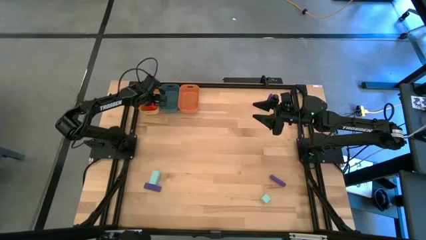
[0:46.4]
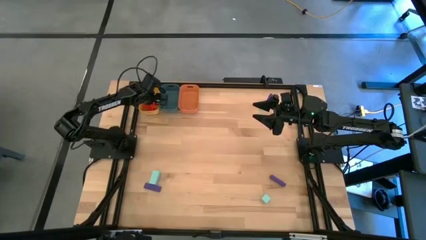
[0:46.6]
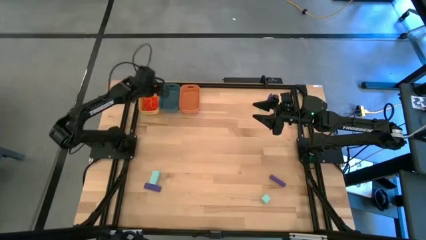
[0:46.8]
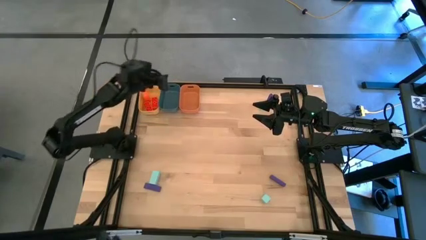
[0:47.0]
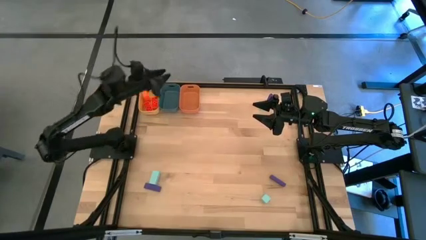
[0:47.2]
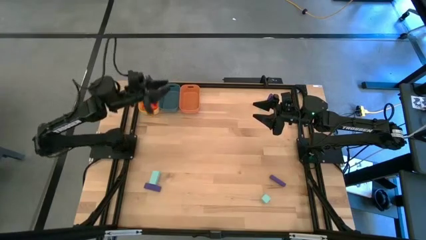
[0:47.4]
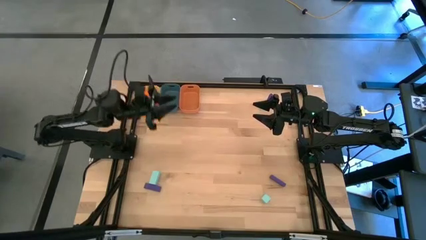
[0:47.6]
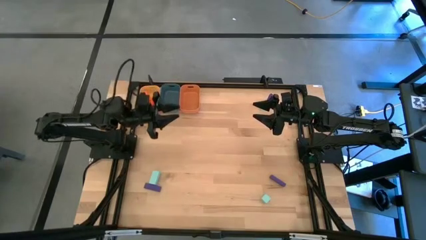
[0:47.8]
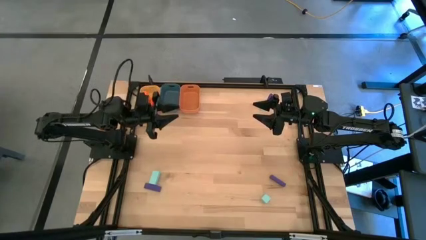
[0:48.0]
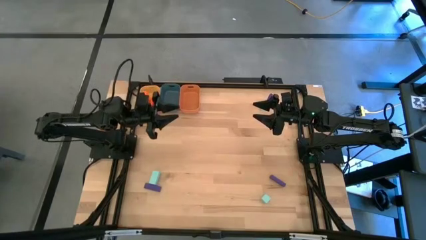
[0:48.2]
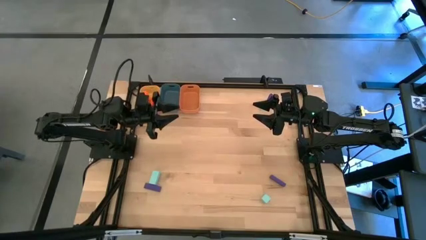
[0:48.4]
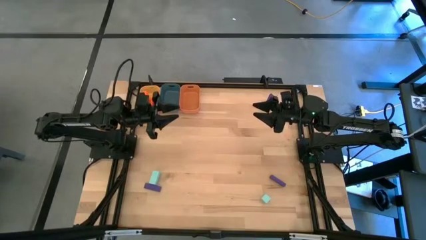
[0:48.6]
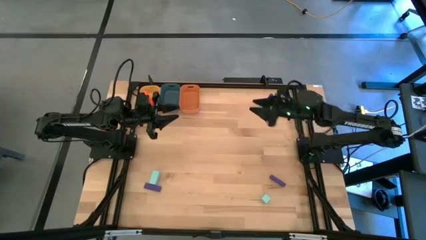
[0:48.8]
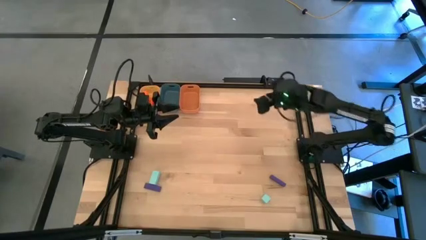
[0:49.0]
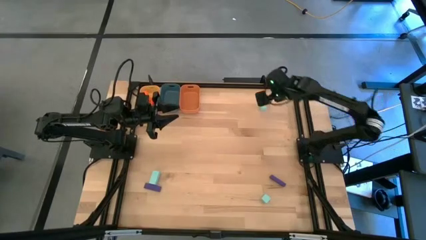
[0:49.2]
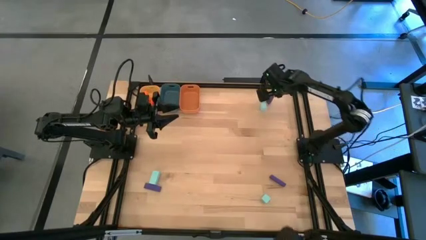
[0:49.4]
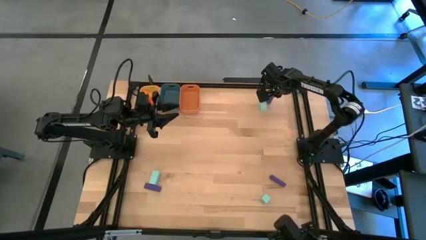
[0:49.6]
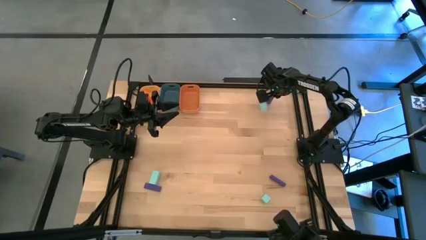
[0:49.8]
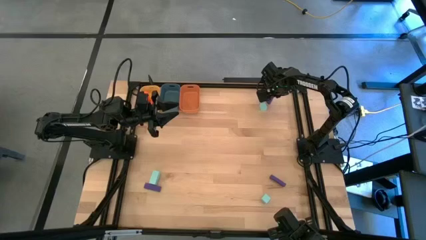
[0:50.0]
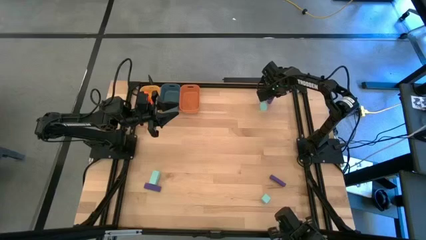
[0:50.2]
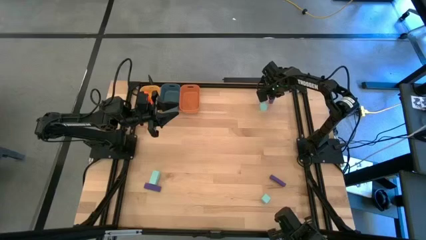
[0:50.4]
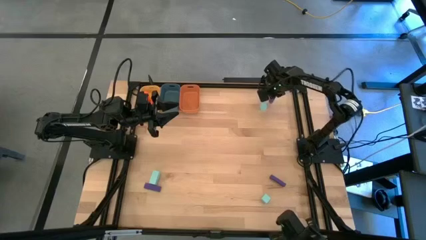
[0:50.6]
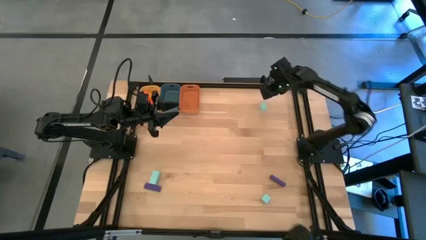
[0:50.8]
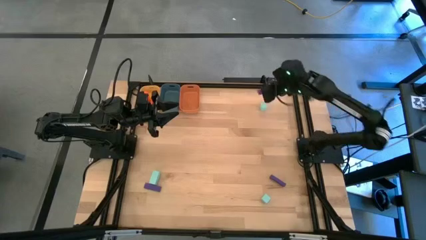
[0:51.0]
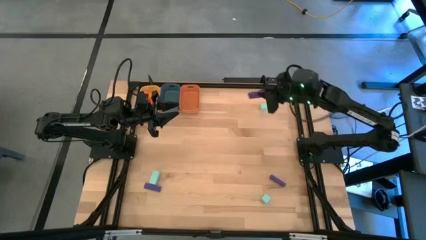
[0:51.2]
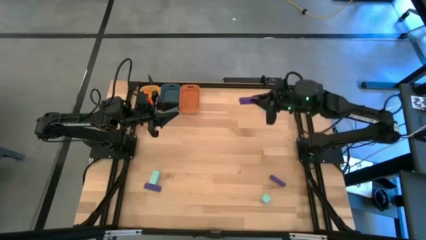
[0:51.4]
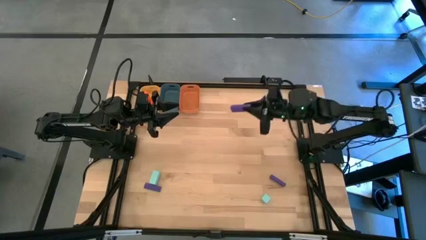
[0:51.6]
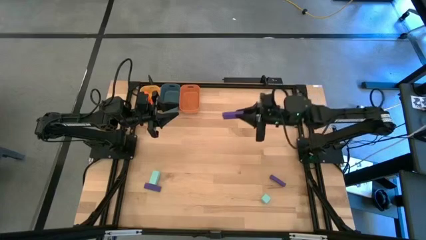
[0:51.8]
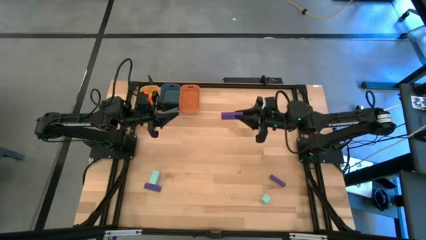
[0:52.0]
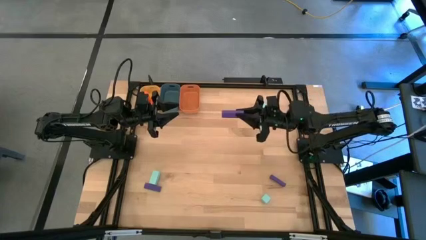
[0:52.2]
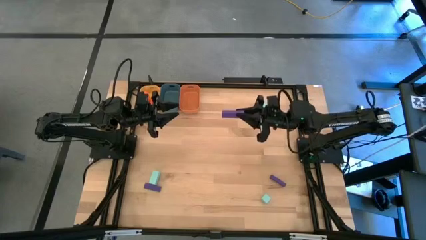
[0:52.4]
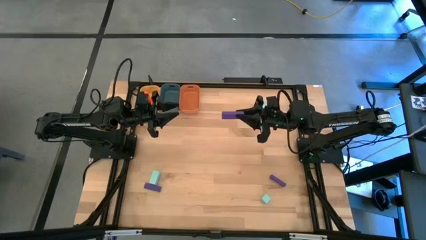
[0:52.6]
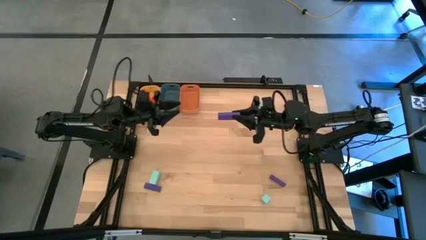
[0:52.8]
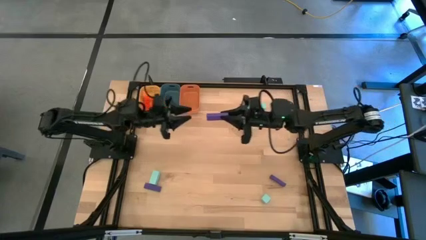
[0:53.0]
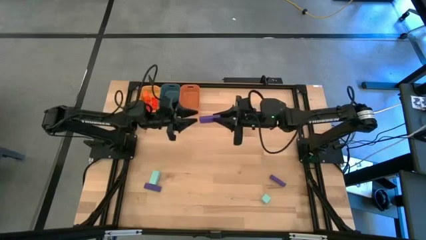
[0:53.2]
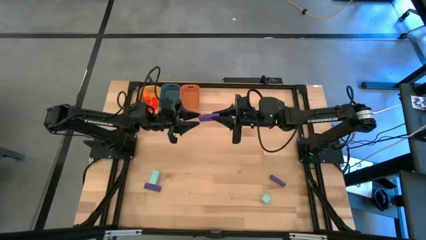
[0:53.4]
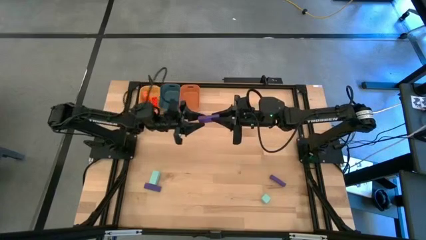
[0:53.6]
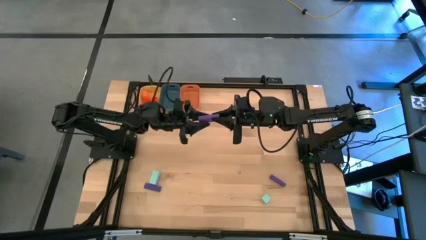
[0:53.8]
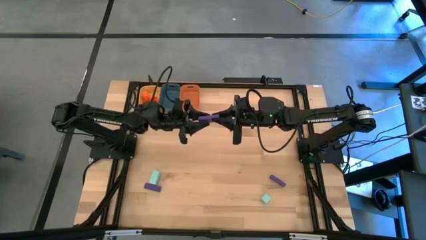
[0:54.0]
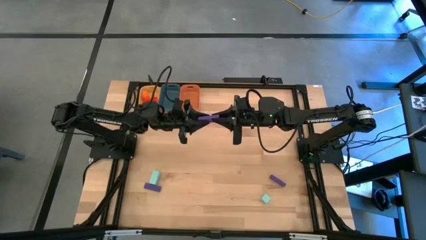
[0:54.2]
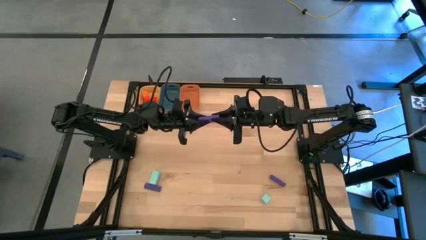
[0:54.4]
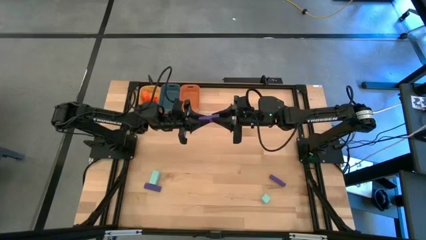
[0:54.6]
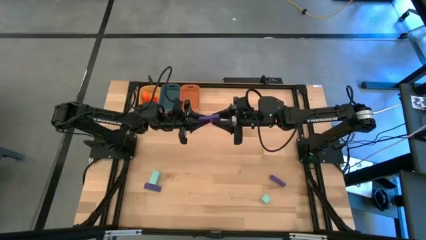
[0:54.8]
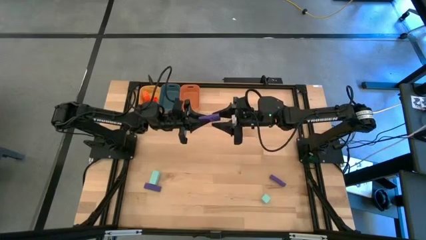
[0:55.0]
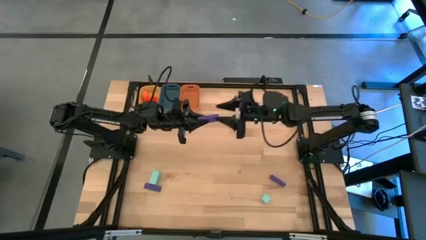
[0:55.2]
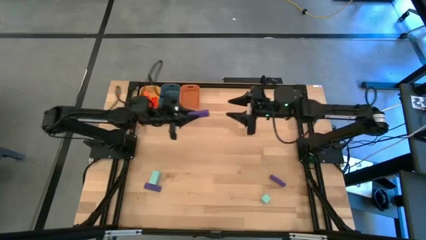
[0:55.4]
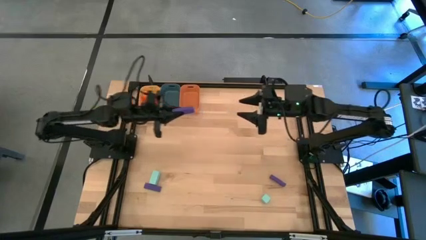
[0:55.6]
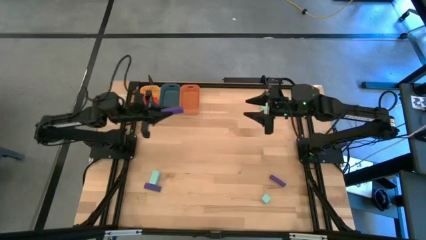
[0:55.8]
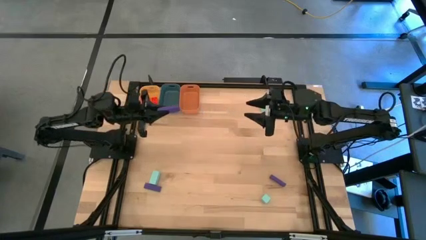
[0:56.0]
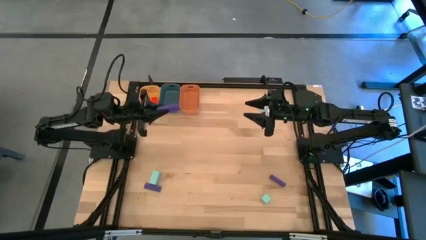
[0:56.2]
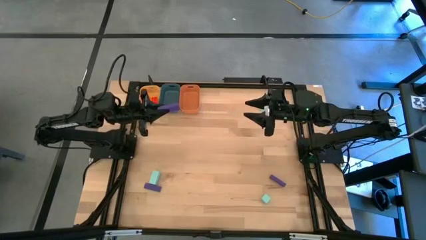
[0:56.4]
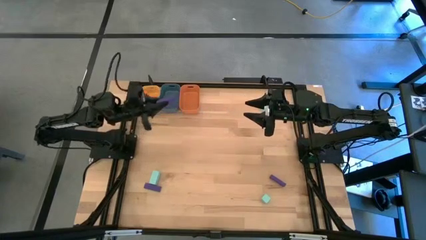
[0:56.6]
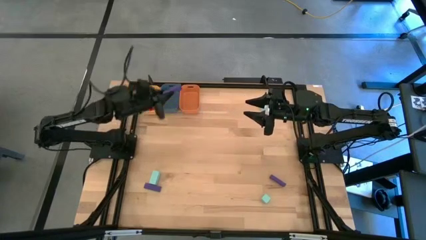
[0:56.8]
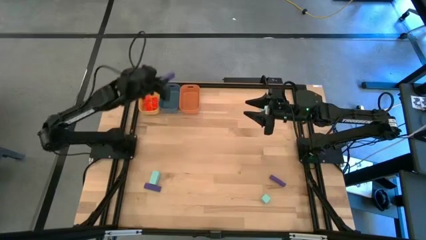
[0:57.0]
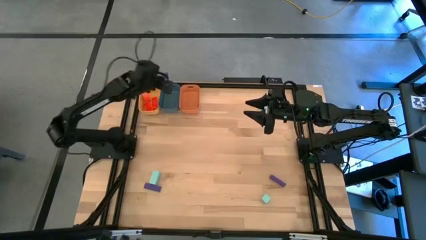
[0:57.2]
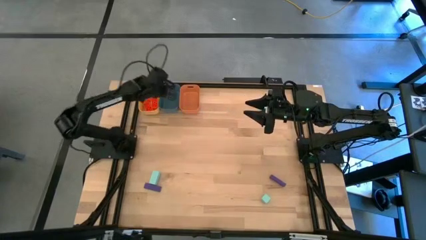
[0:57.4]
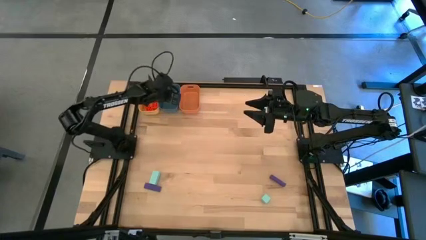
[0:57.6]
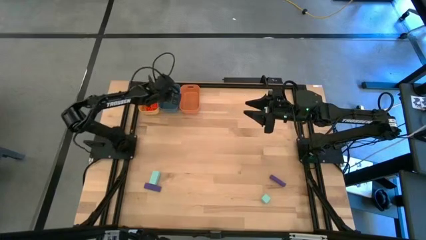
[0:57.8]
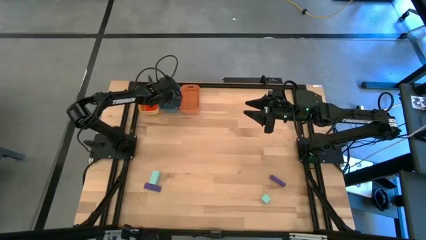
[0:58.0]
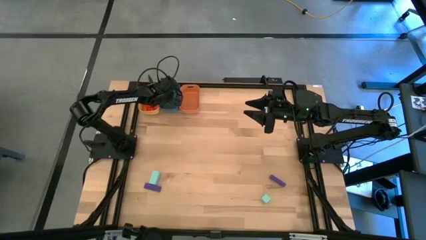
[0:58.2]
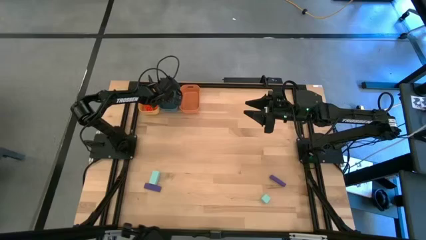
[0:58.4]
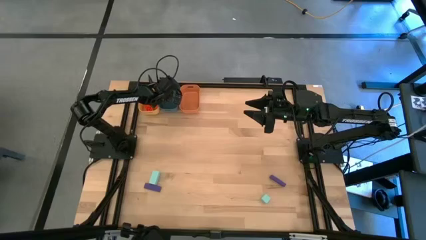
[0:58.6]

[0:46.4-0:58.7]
Task: Sort & place blocks by color
Put the top violet block into the blue bin

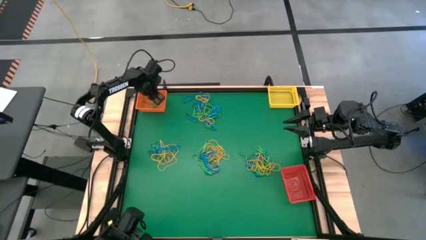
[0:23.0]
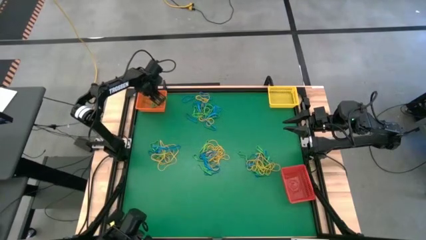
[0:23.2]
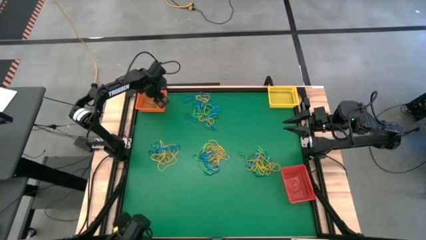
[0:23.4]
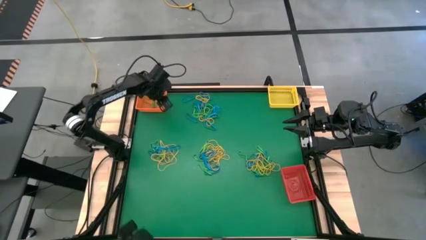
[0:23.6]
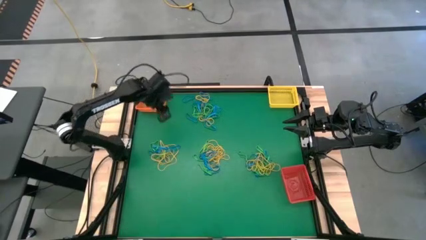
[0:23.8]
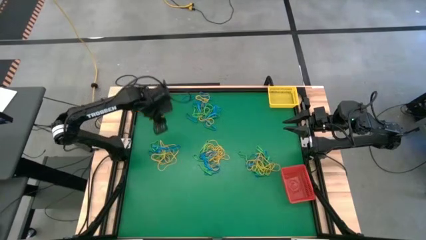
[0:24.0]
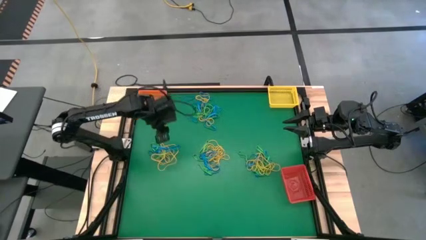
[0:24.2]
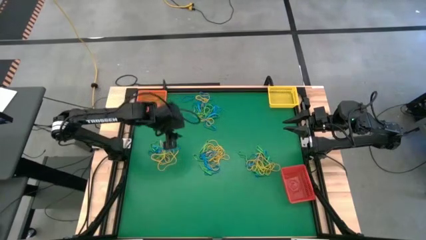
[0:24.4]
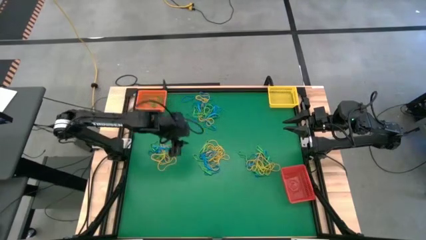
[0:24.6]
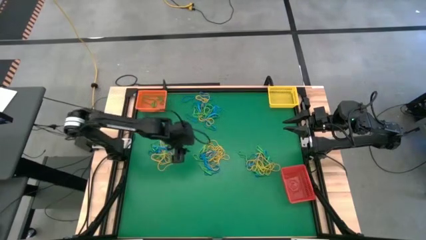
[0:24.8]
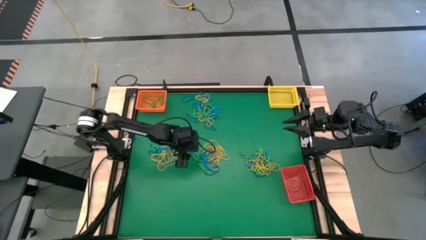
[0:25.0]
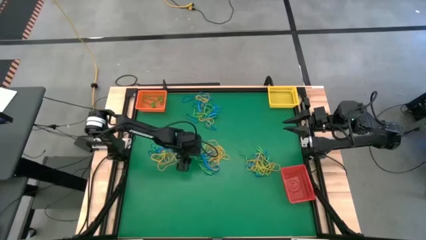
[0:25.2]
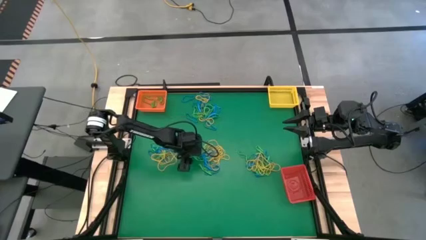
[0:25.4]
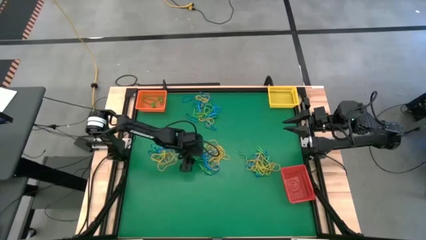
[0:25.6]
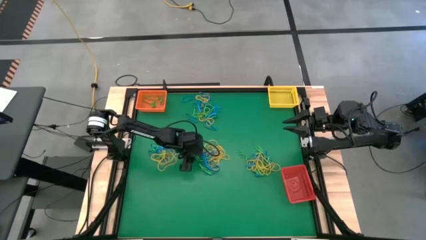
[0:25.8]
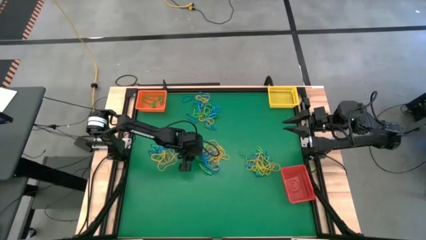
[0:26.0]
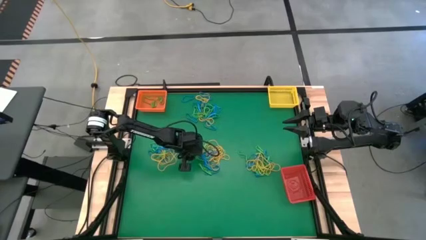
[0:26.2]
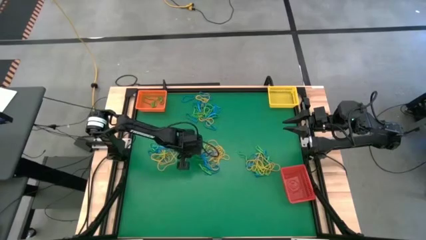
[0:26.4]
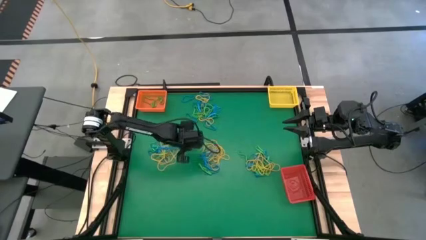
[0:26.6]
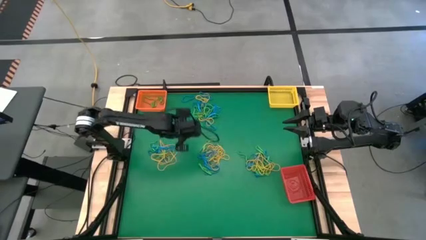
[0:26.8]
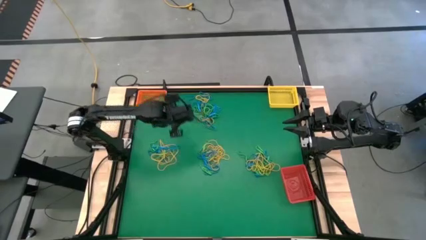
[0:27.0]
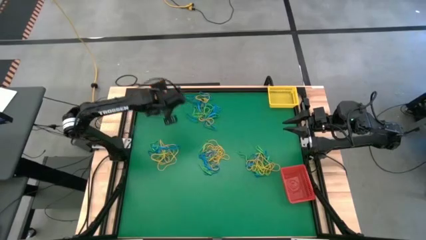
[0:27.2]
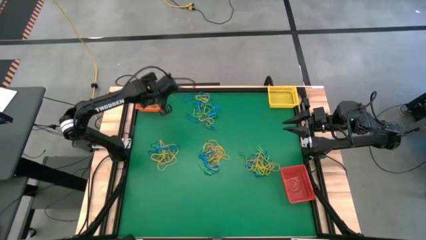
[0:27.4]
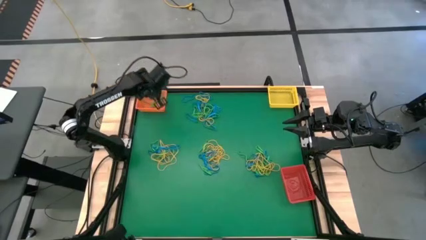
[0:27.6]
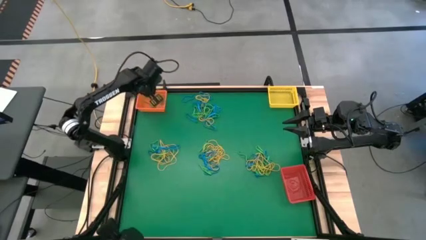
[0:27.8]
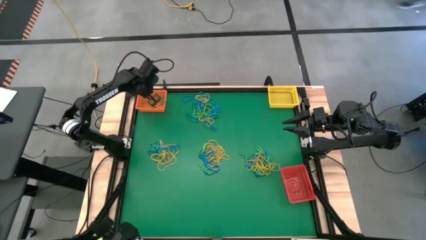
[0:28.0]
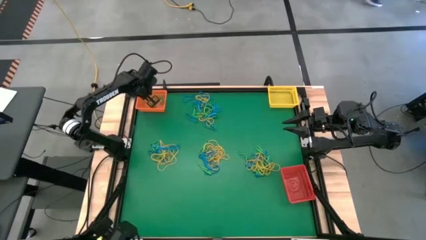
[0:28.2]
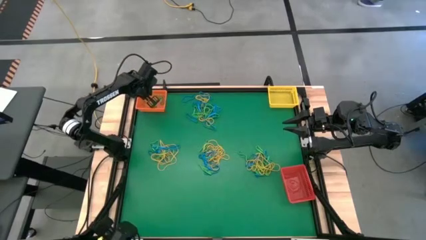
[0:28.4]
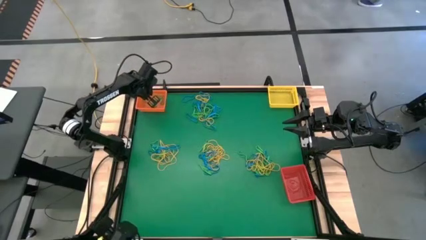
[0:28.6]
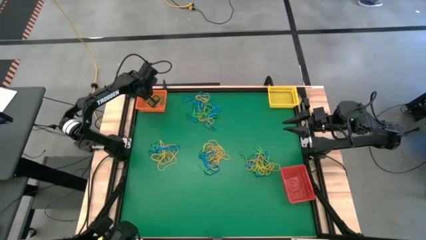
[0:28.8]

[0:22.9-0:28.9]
Task: Sort rubber bands into baskets
Put the green rubber band into the orange bin
